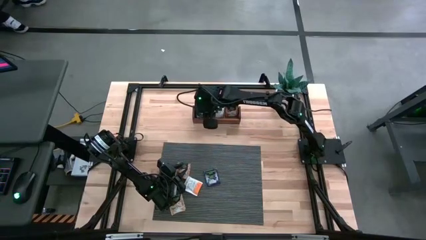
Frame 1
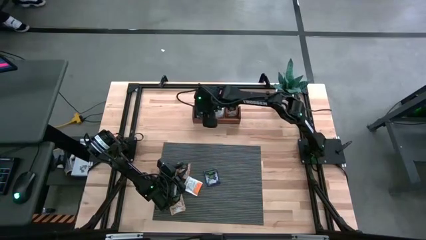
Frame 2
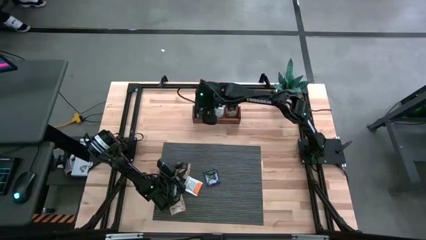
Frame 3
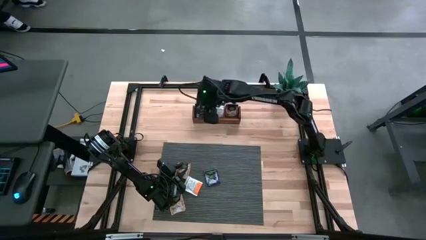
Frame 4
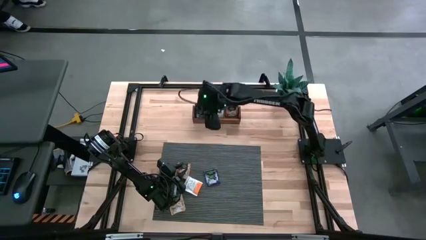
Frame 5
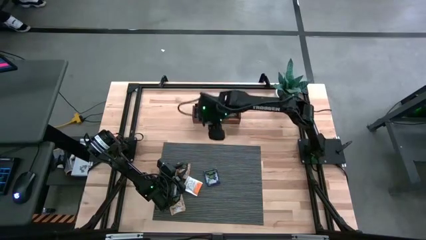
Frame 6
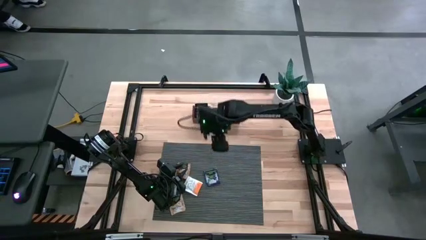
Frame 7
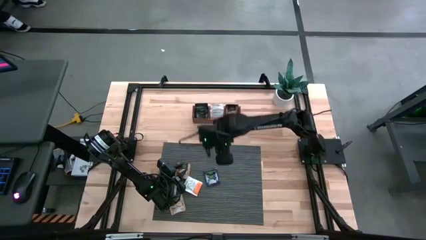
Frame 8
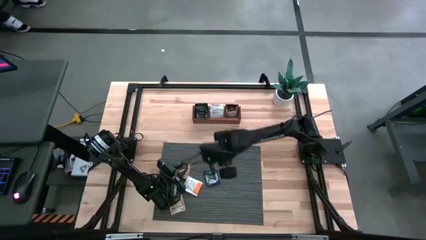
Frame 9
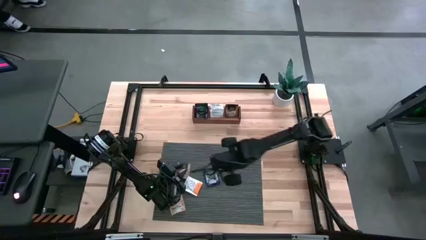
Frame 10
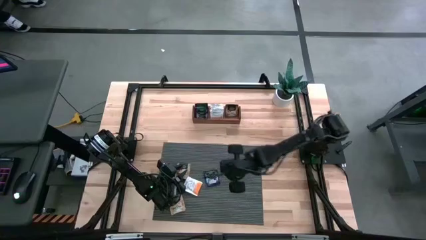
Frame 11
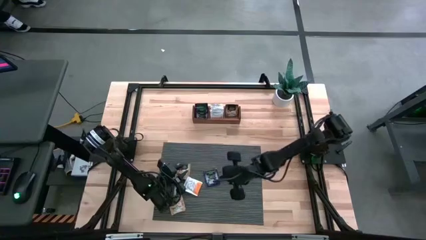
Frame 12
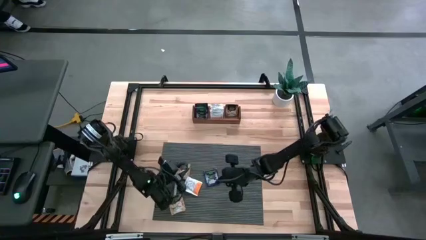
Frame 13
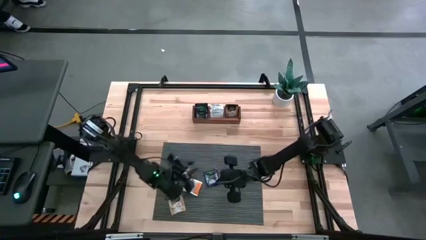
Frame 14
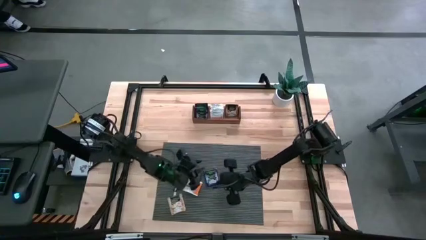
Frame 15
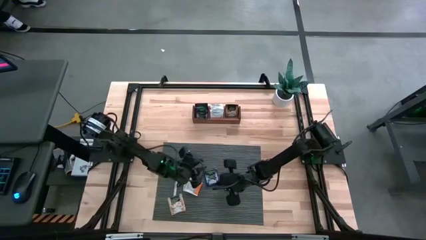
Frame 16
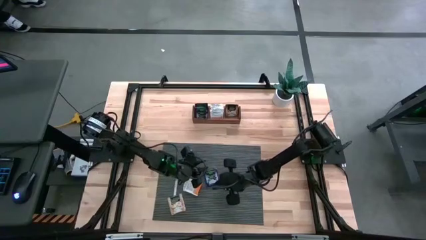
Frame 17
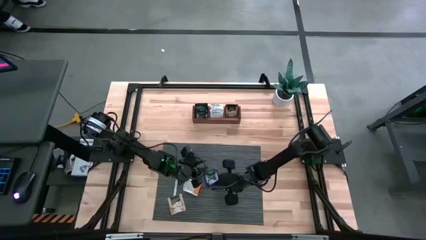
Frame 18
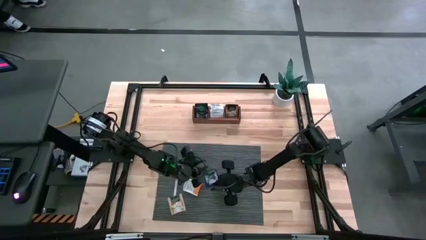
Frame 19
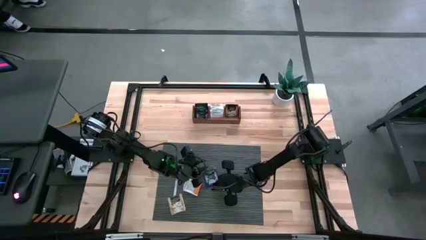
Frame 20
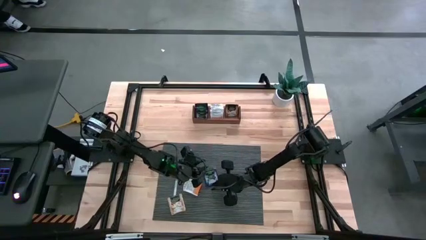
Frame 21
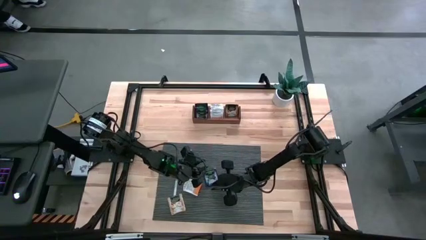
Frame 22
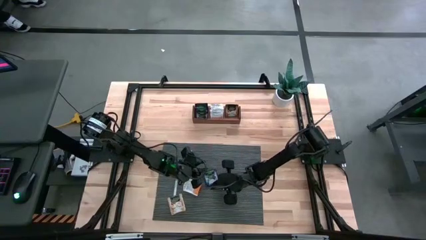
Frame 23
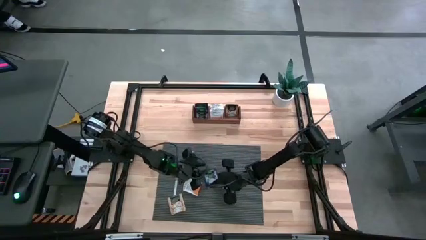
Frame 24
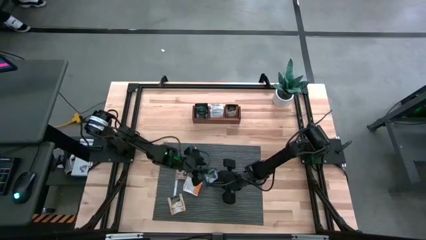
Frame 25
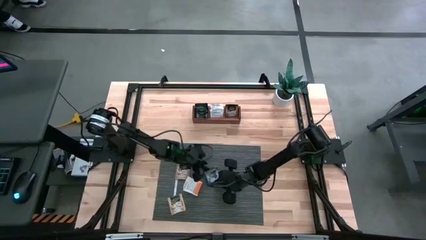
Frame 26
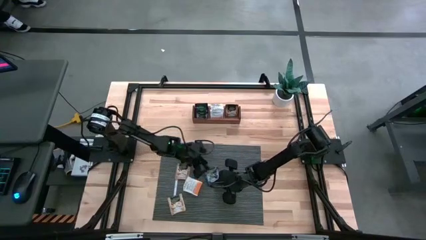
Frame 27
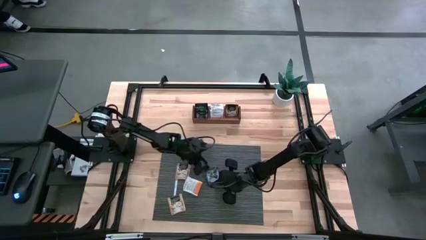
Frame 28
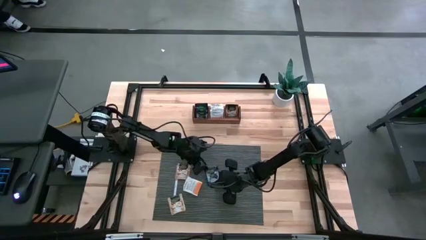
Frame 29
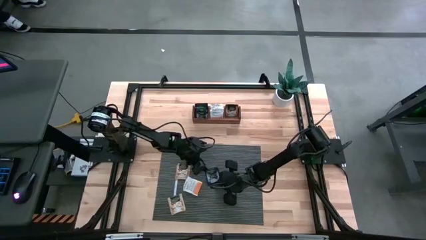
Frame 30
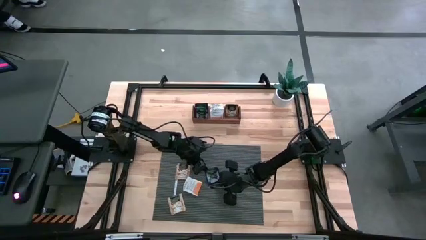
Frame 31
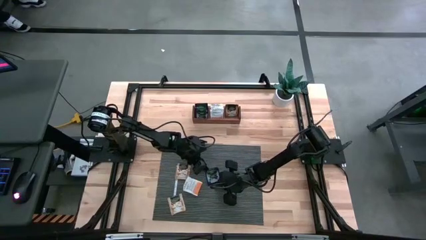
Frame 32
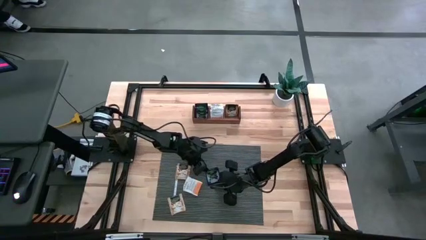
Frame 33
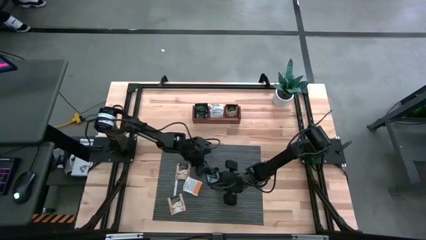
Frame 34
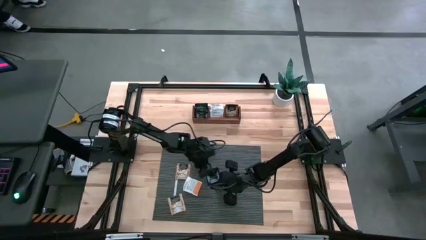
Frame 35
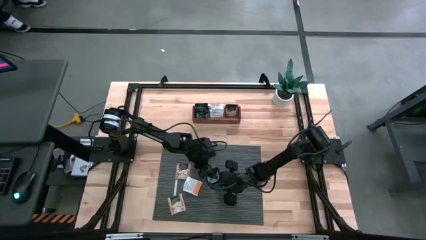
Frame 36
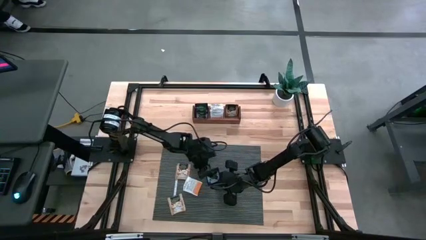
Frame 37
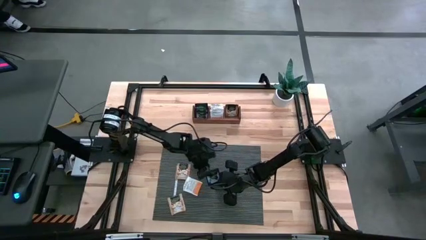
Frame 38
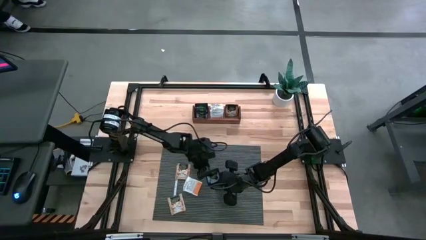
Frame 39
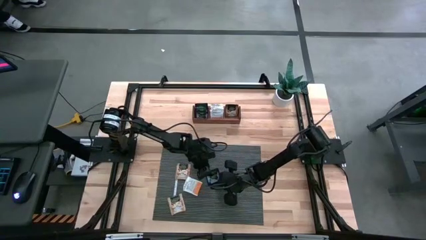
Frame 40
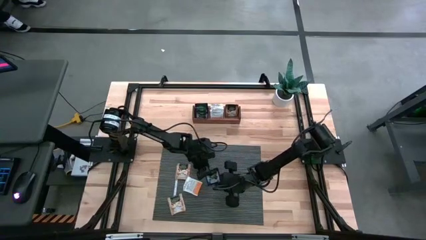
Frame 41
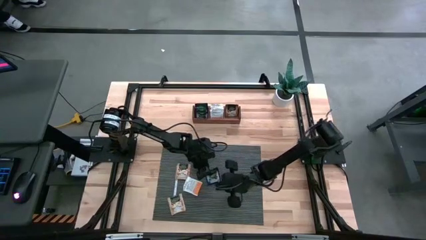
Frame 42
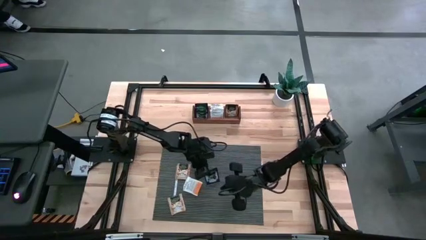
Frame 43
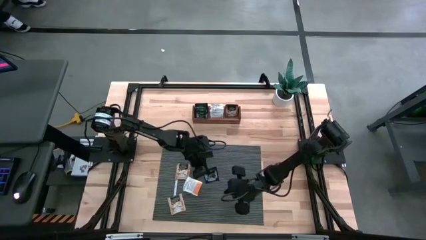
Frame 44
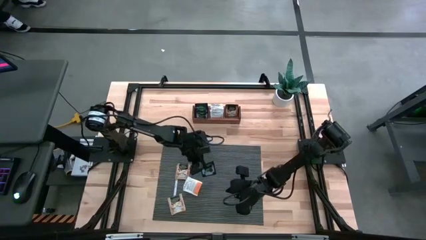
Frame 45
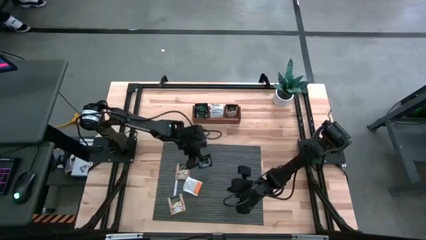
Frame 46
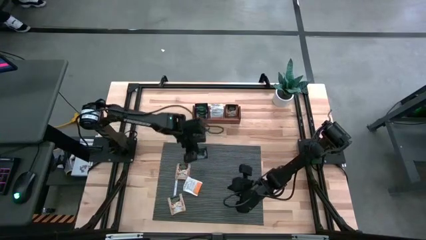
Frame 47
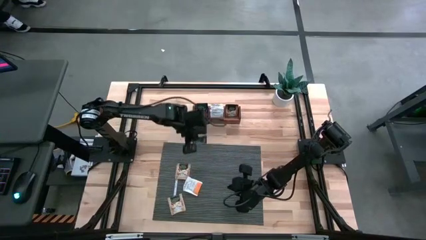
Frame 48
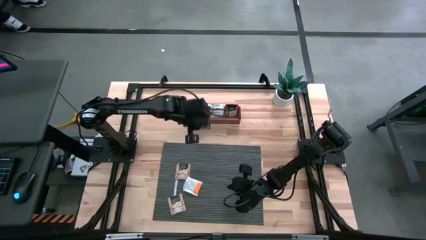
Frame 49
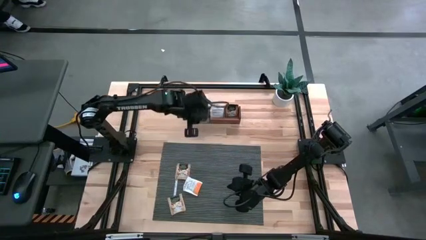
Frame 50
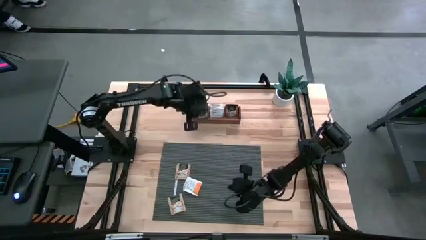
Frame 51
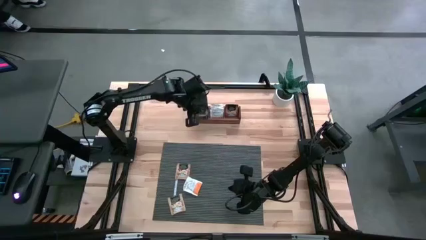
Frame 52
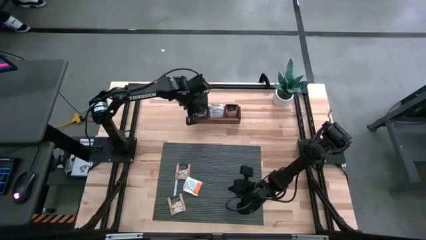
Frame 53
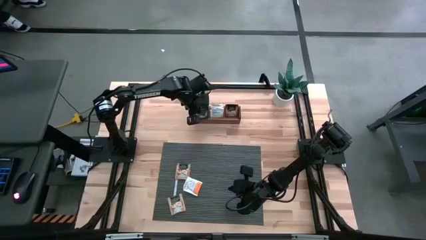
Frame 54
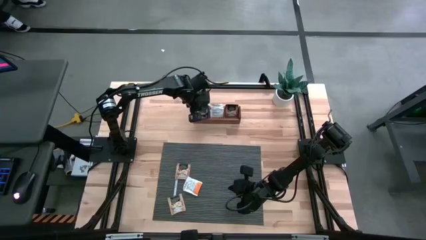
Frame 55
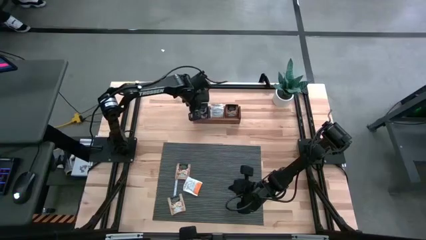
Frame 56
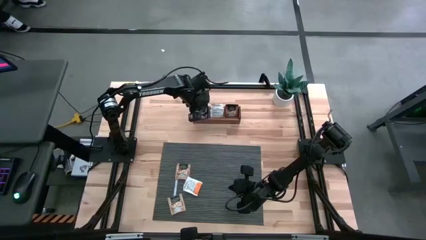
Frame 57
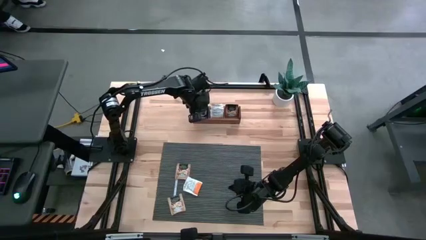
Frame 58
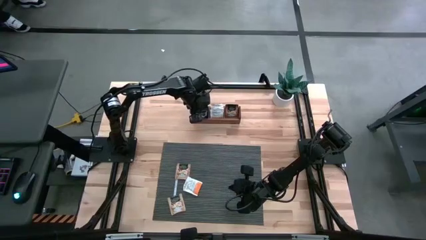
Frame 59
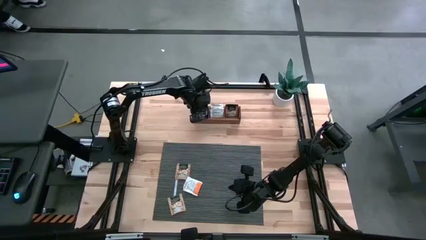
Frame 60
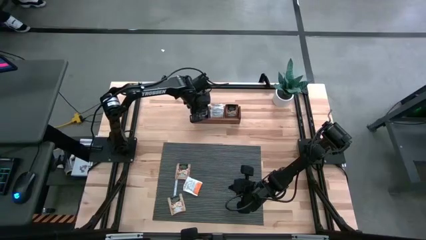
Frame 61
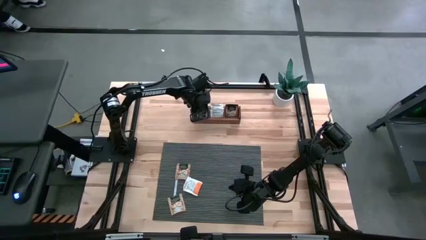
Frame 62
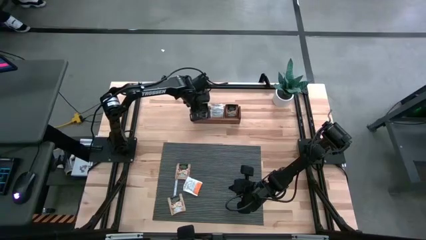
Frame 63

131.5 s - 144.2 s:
Task: Pick & Place Tea
Put the purple tea bag into the left compartment of the wooden organizer

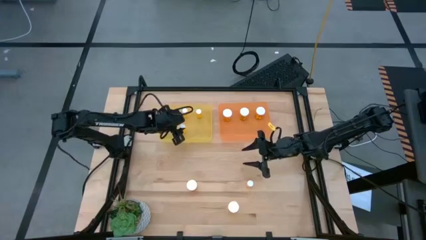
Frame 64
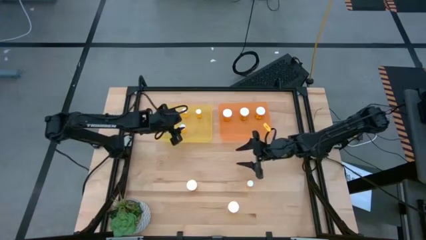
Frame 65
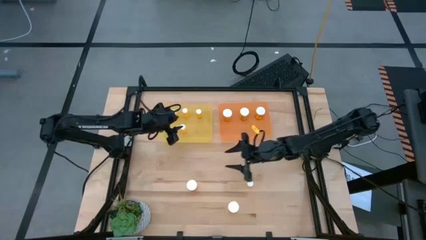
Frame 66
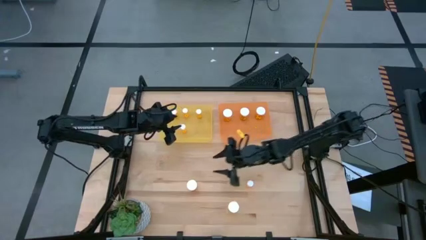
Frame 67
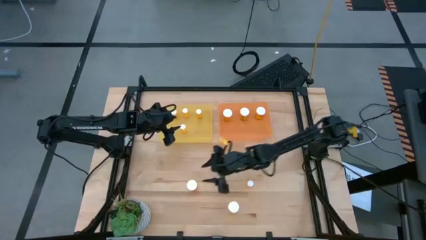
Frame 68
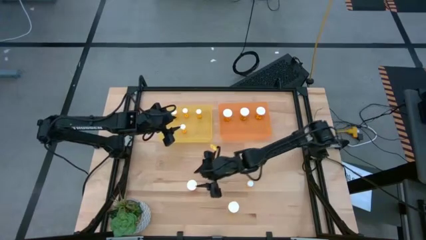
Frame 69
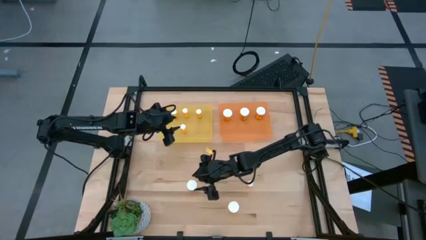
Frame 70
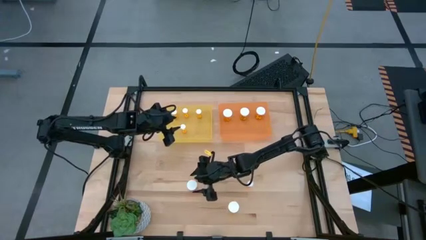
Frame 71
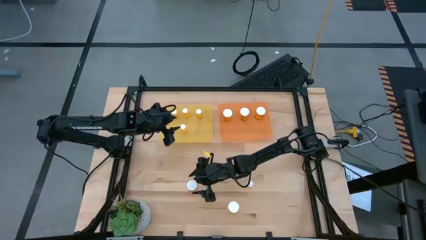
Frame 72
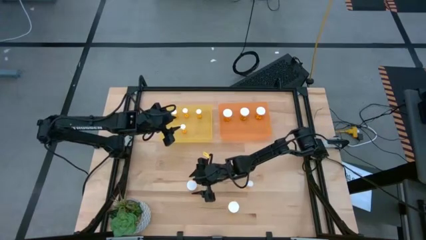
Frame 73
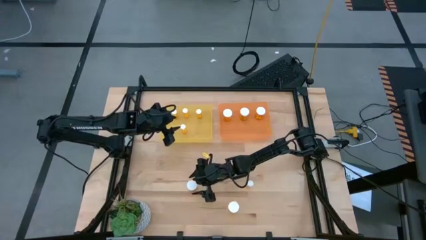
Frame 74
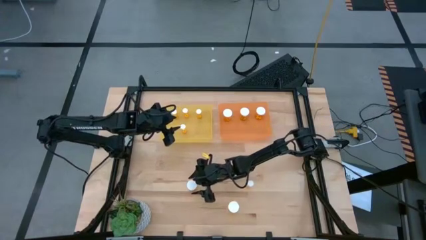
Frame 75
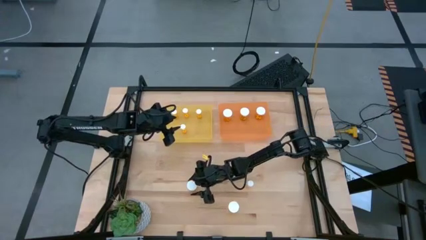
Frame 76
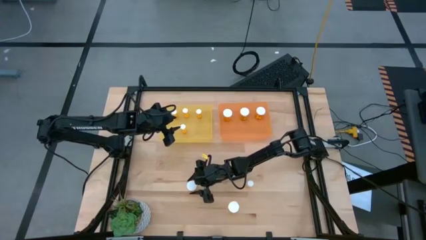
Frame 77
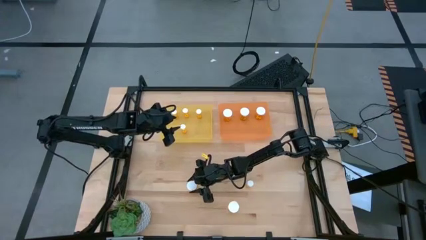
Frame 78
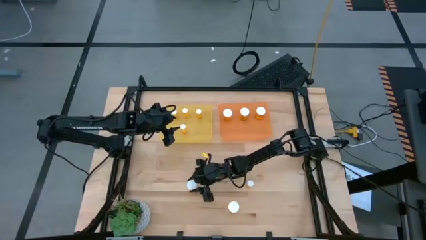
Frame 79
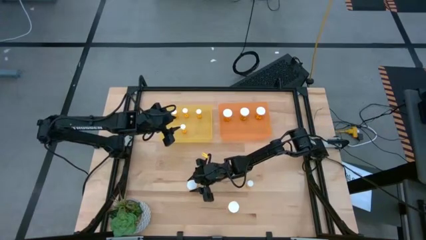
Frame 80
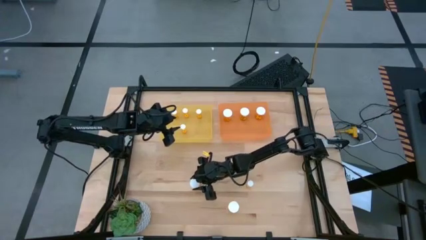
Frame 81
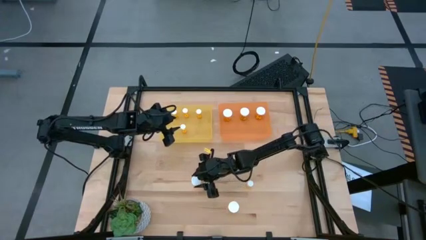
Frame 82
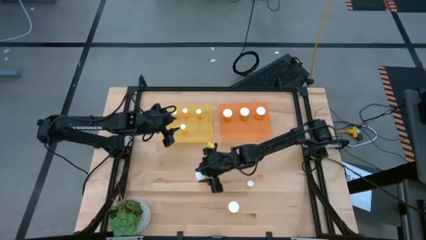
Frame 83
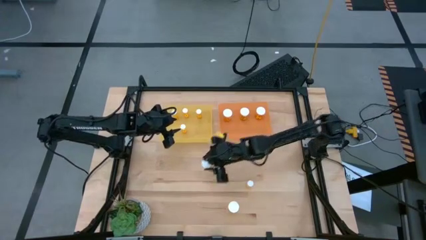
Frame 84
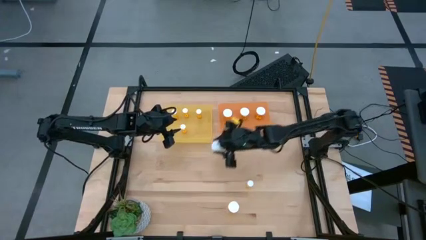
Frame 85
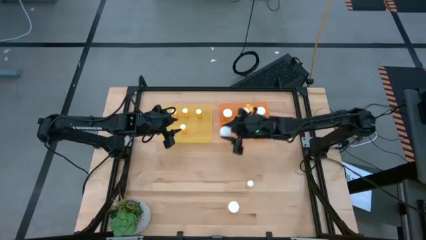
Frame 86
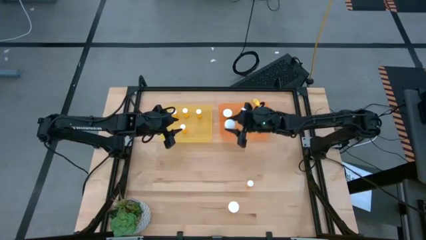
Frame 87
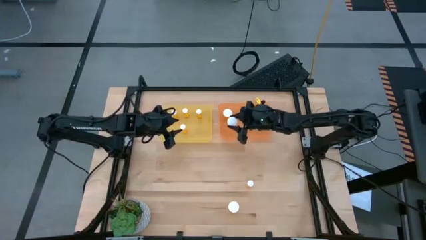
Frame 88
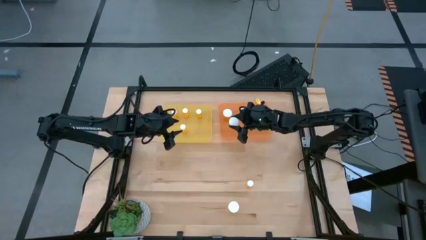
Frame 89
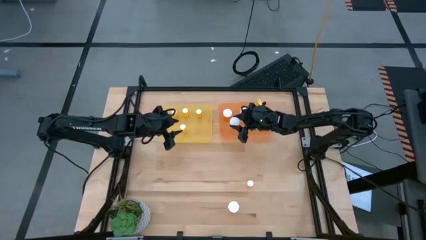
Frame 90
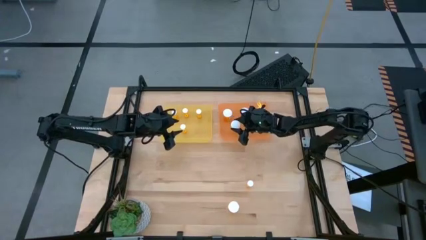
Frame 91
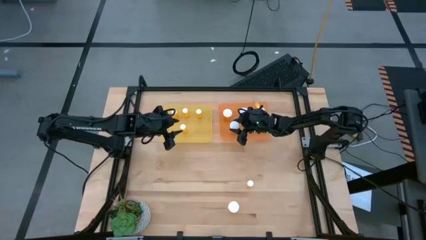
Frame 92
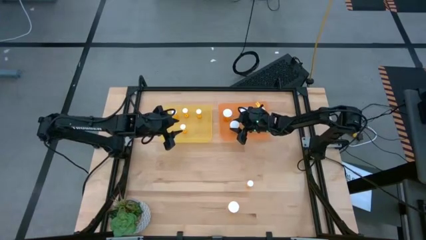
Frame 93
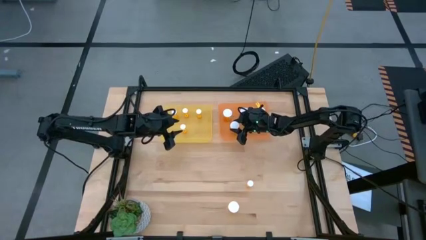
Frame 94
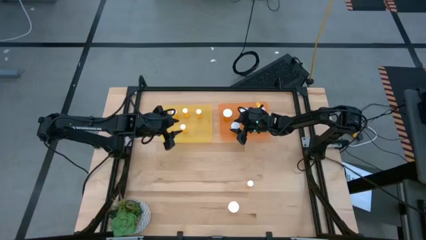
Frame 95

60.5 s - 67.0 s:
Task: Pick and place medicine bottles into bin by pill shape (circle, oval)
Put the big orange pill bottle into the orange bin
